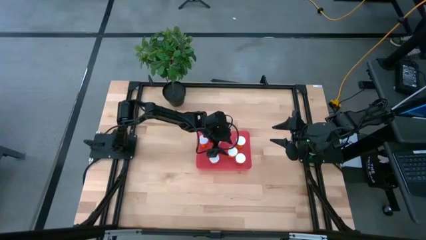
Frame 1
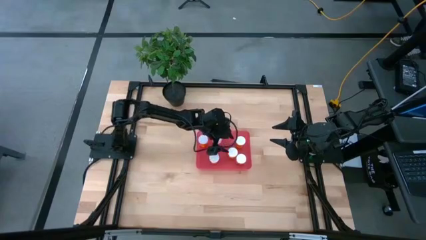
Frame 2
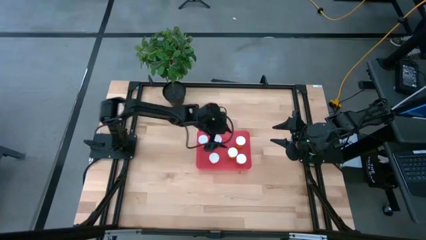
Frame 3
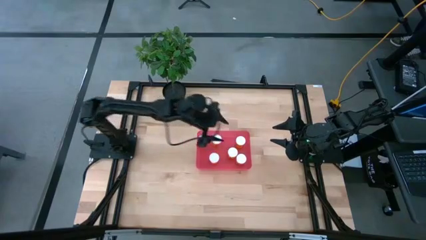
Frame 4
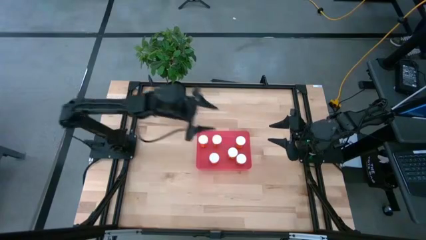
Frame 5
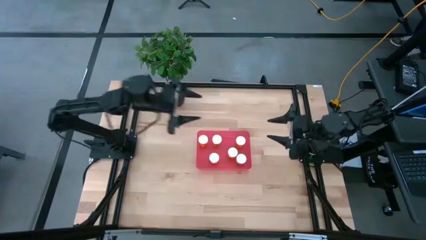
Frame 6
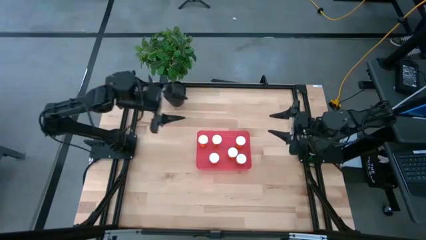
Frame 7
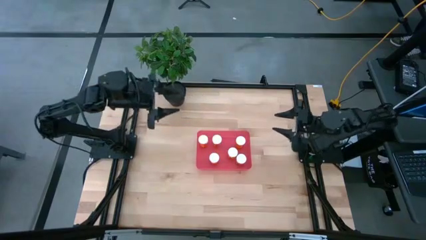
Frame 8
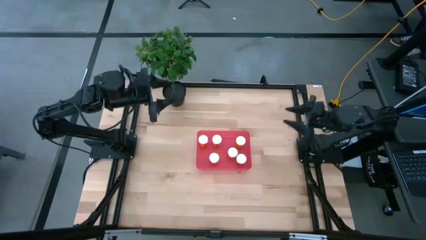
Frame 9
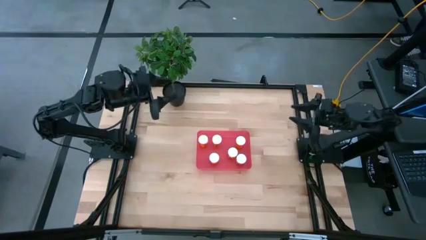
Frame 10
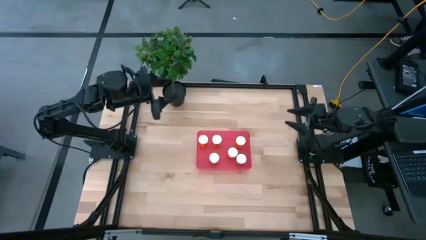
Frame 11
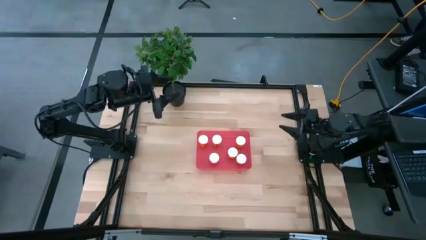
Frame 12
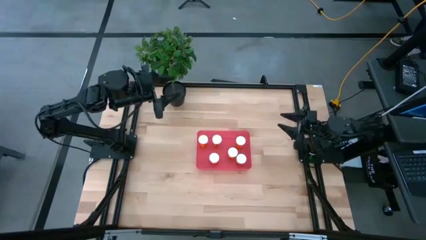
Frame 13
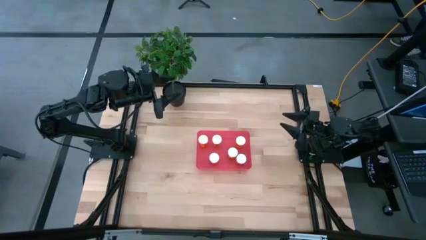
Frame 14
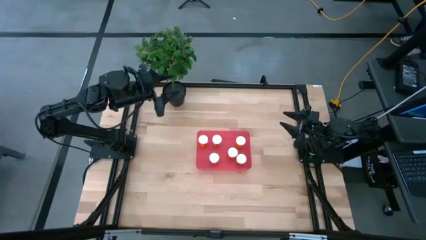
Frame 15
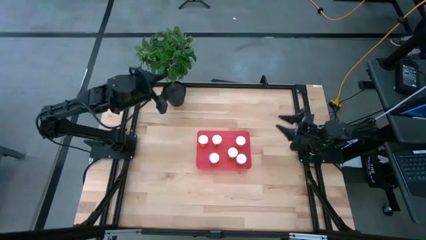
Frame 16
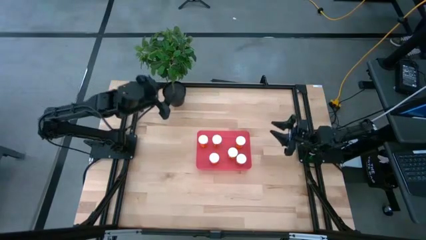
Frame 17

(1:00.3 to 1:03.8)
Task: Pick and place pill bottles into a basket
Return to Home Position

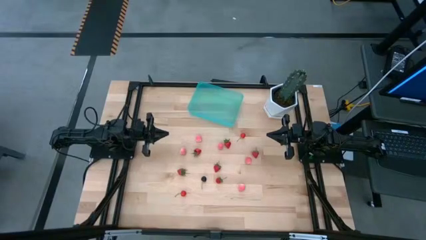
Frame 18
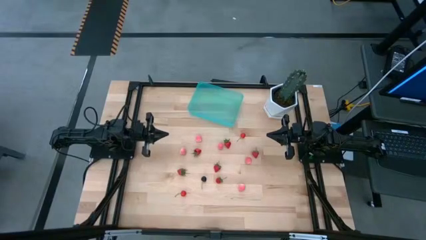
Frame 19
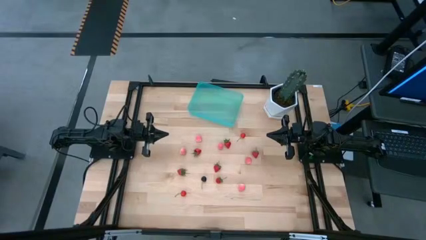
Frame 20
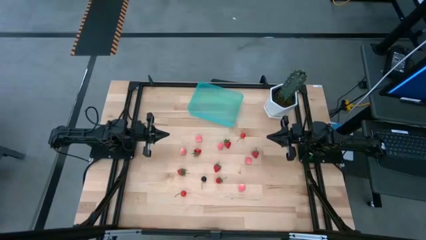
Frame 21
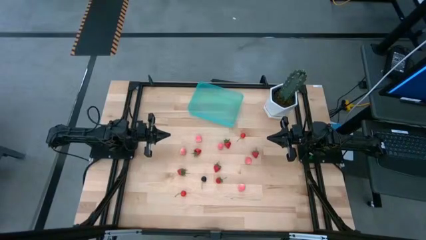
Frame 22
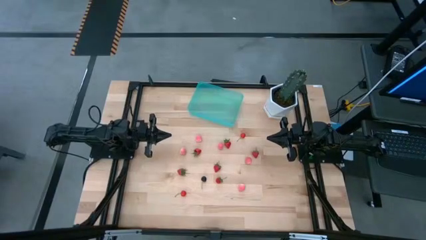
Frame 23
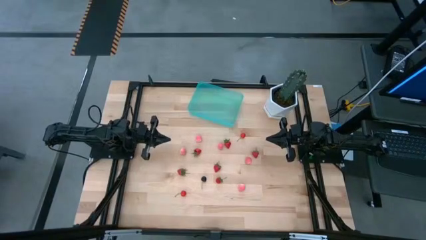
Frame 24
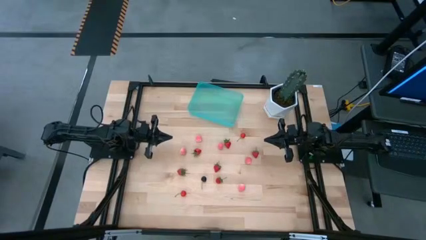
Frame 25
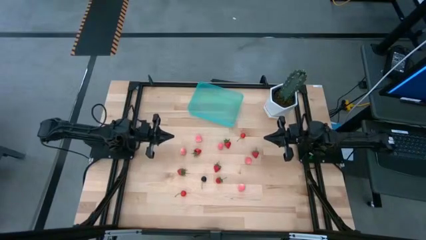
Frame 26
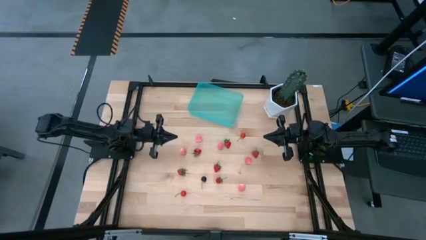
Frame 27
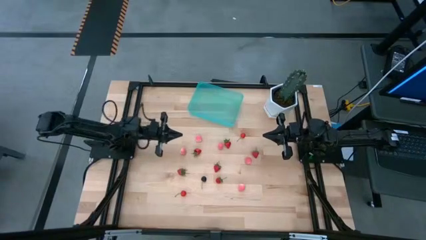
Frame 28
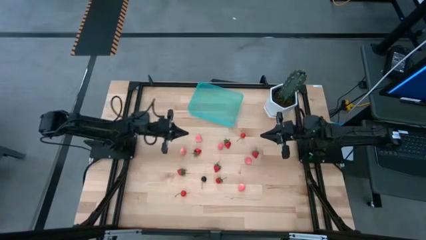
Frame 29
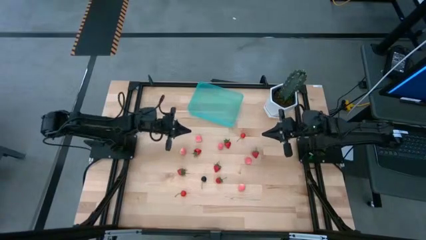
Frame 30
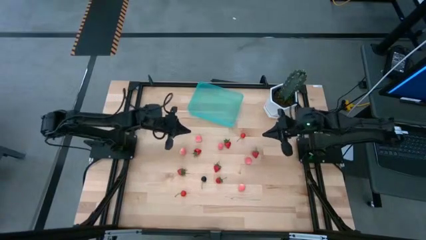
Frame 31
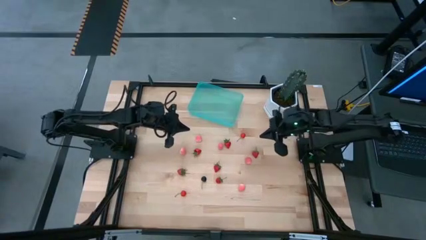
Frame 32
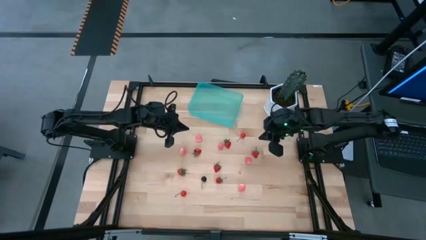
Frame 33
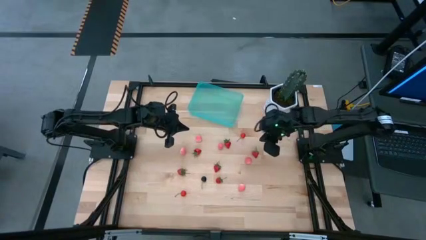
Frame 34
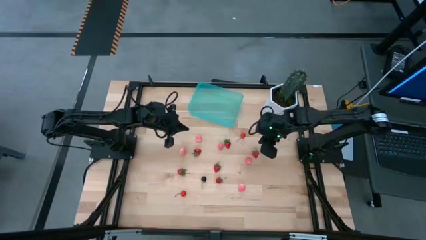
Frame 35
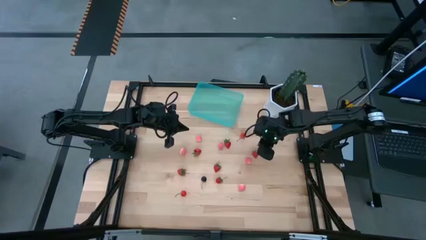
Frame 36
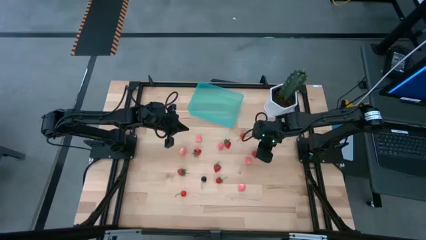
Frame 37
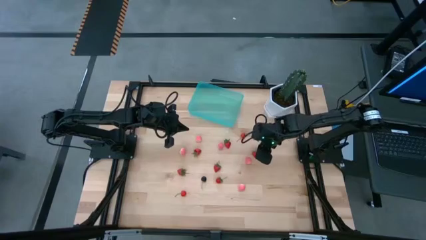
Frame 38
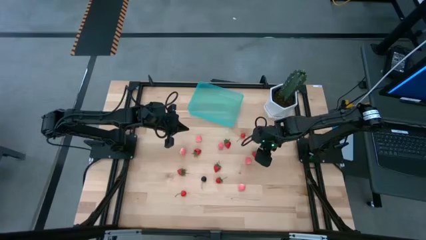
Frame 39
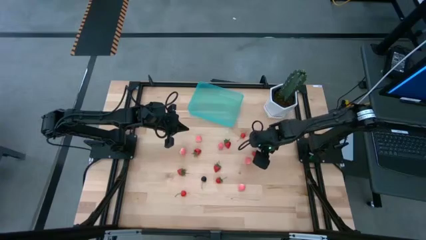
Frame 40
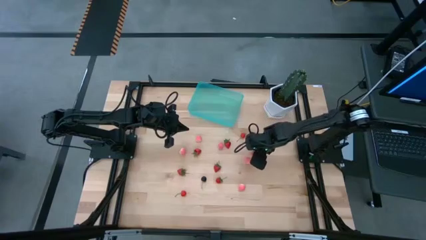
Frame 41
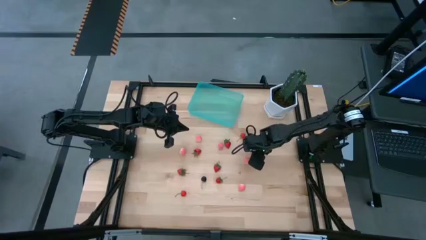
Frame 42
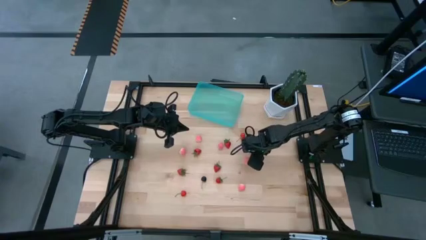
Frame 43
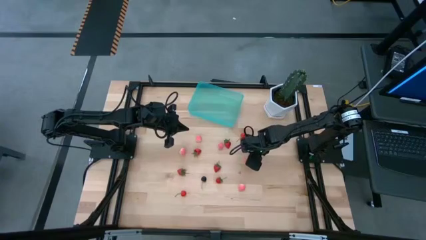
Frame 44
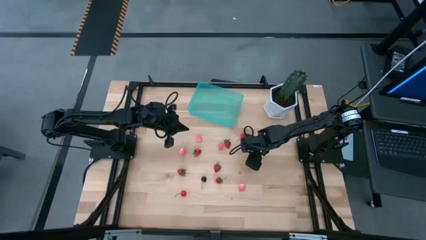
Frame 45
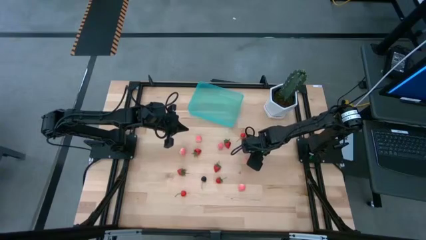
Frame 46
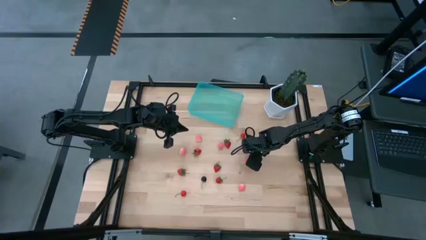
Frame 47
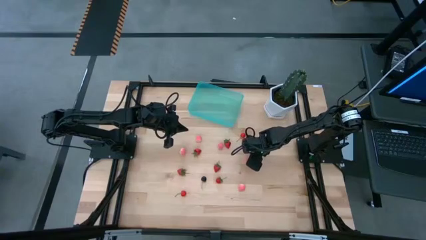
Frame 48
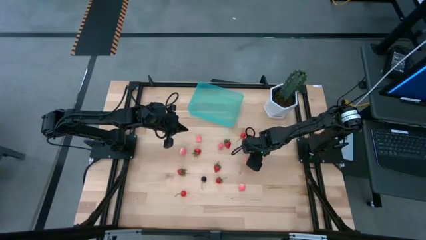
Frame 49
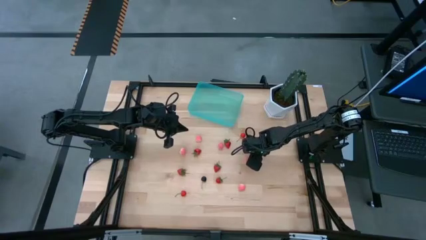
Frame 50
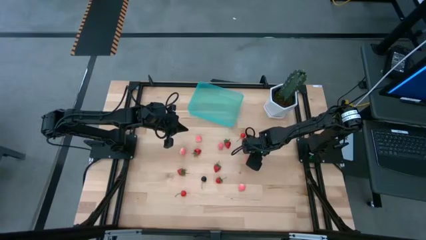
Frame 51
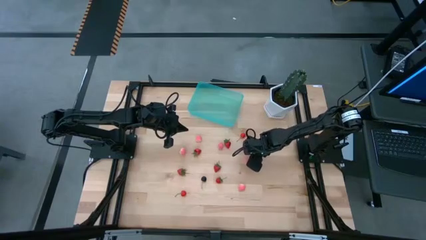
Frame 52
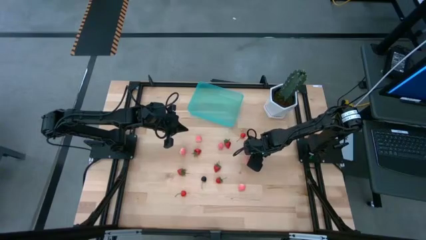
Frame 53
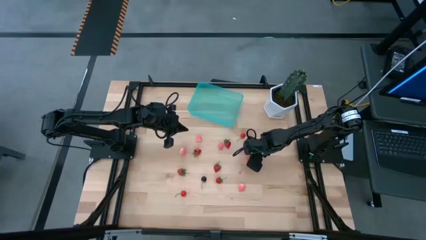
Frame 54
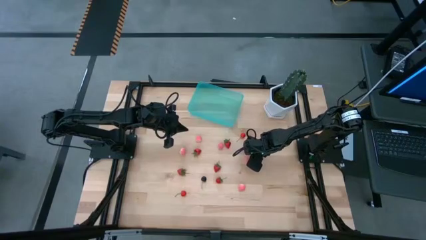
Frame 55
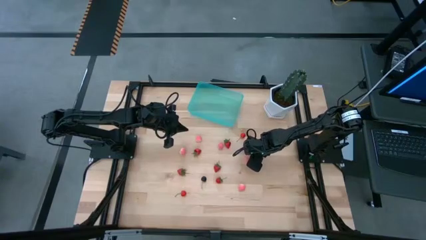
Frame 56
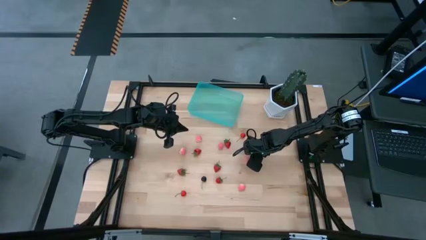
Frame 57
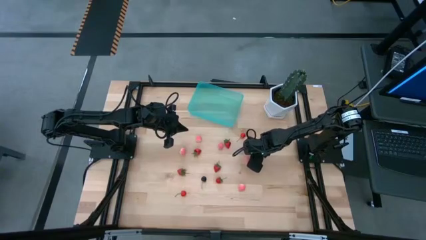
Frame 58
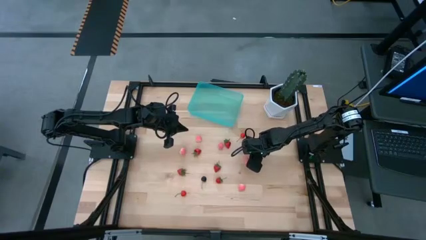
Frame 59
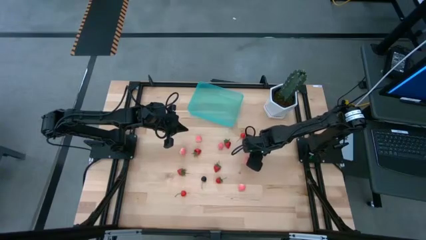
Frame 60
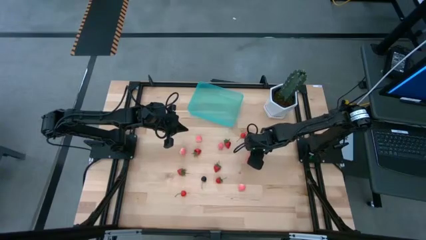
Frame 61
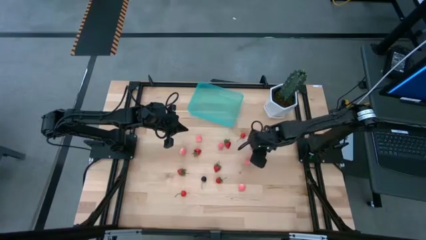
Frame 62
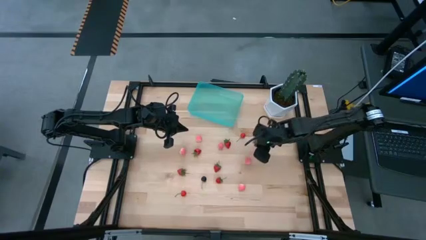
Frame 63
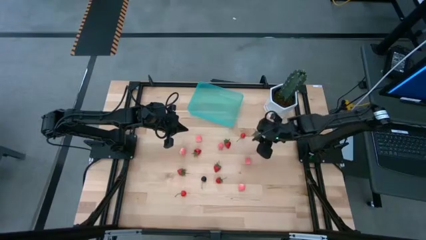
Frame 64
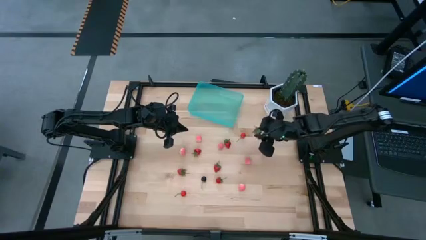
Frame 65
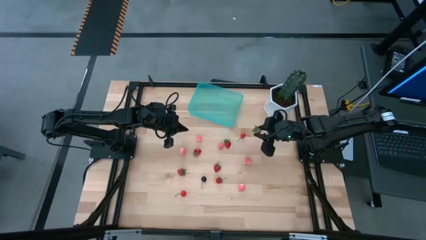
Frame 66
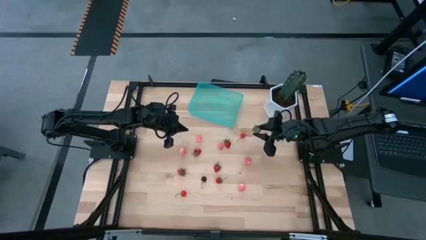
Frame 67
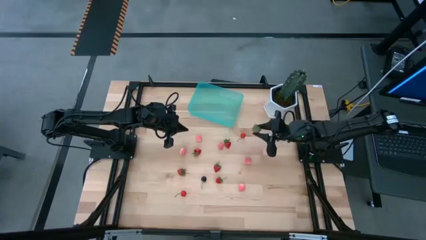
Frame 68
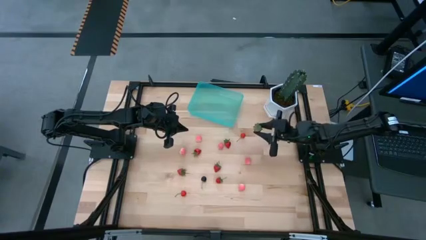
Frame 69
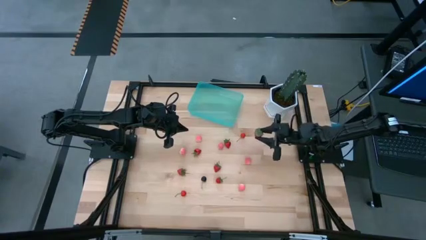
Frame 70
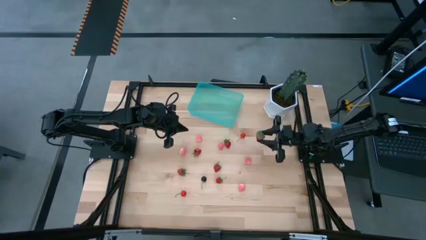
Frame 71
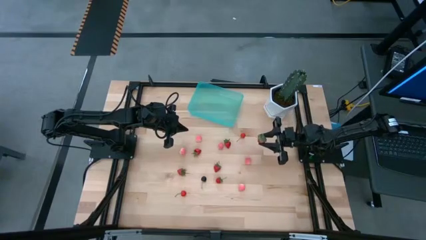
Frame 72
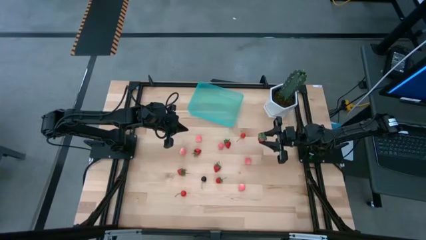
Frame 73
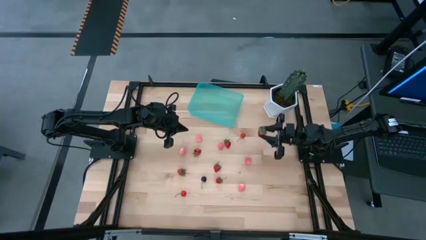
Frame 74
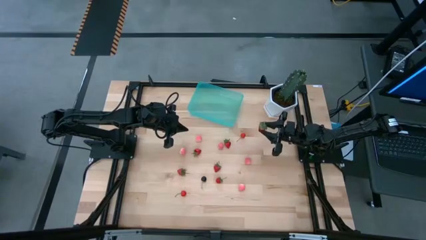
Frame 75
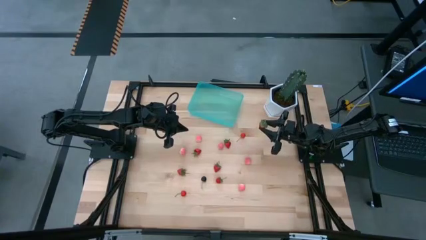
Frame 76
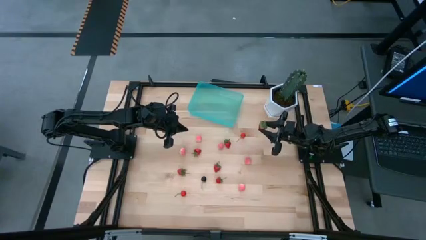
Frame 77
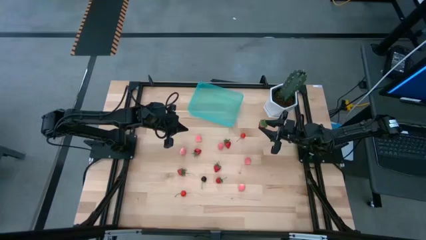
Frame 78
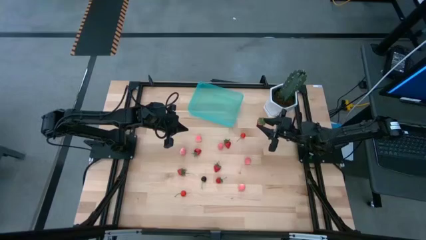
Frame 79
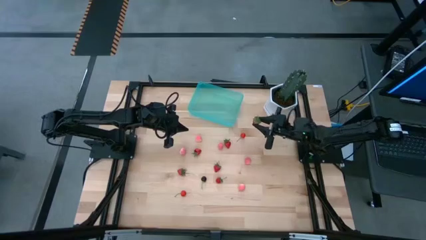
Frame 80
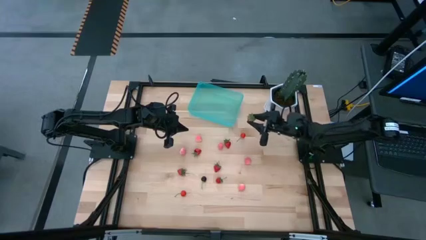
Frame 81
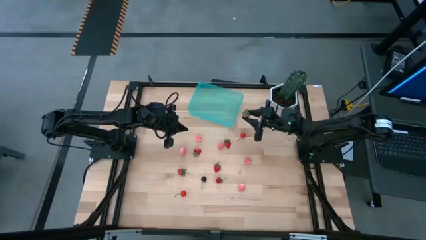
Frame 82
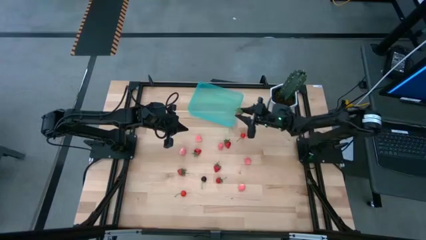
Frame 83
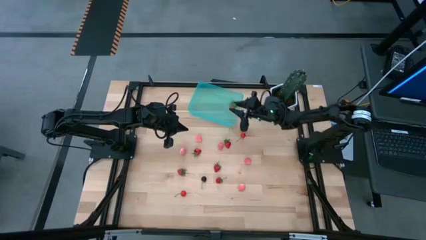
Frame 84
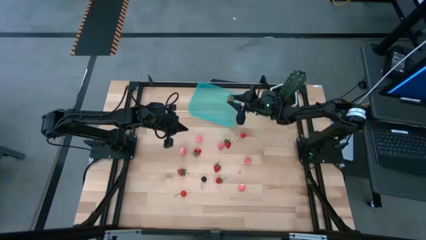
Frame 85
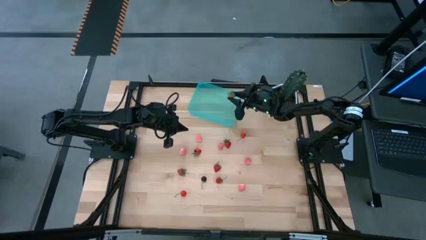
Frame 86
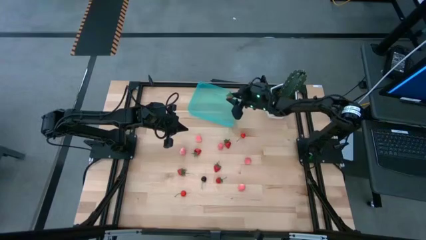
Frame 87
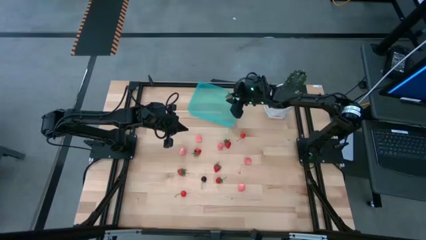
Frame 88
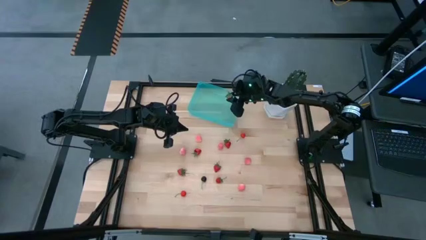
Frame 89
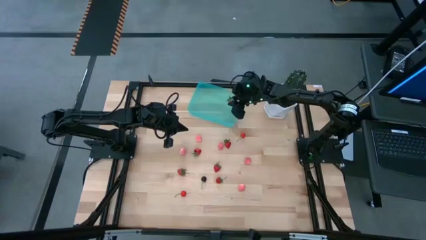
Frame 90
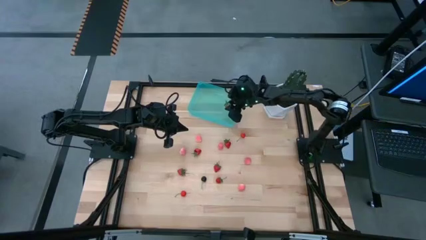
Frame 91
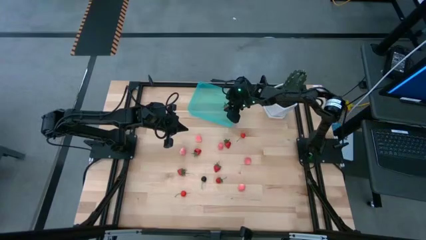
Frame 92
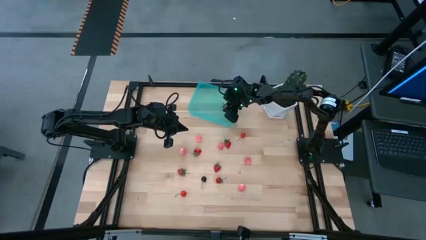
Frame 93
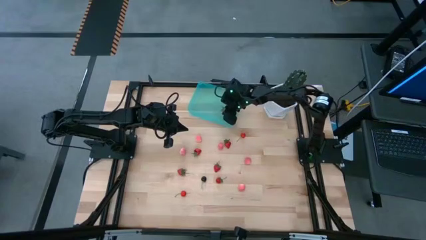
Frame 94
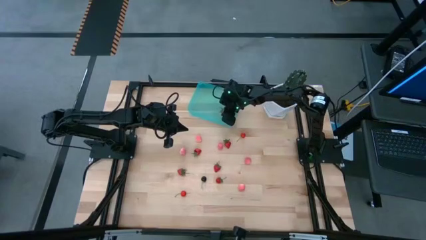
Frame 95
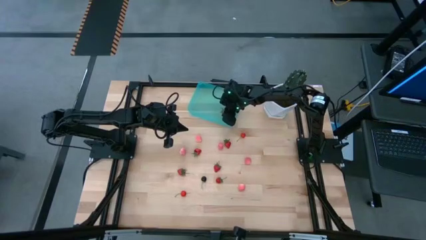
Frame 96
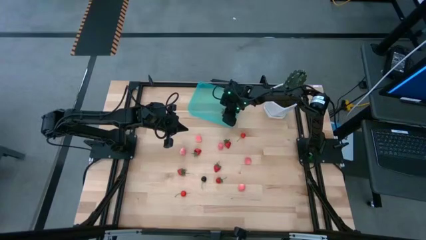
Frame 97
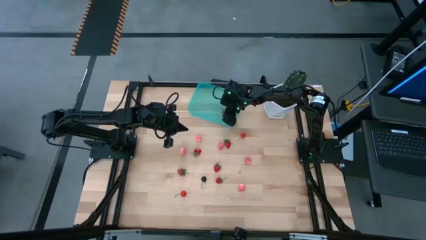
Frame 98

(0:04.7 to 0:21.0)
Task: Pick and placing Produce into tupperware
Put the red strawberry into the light blue bin
